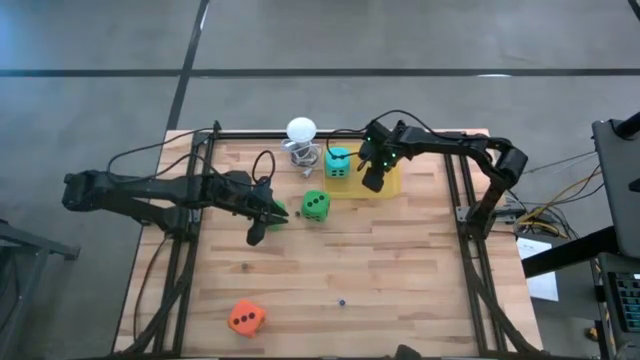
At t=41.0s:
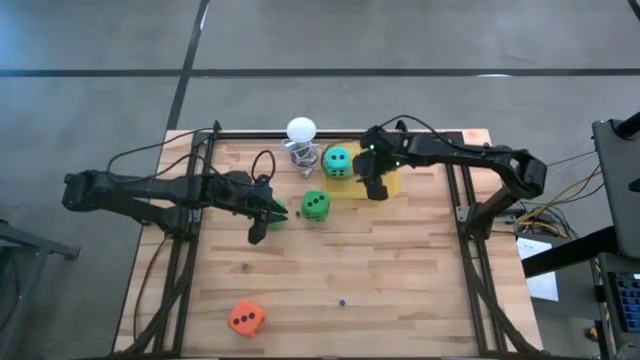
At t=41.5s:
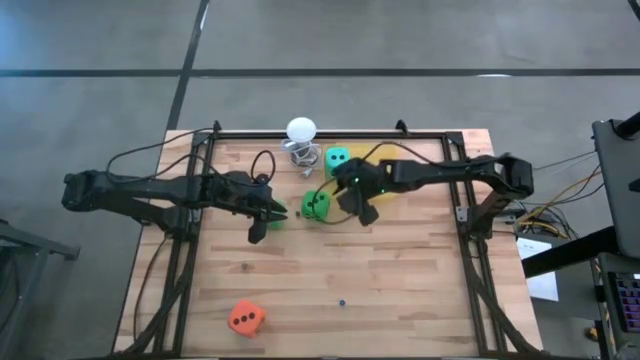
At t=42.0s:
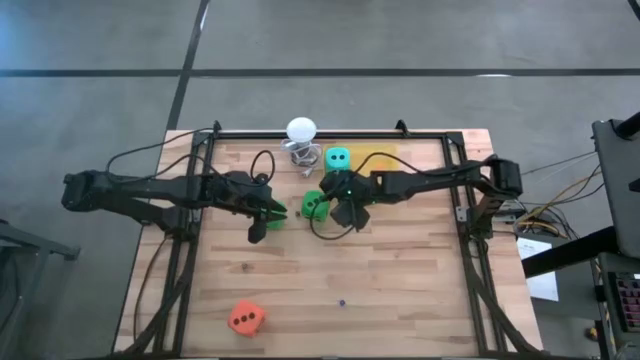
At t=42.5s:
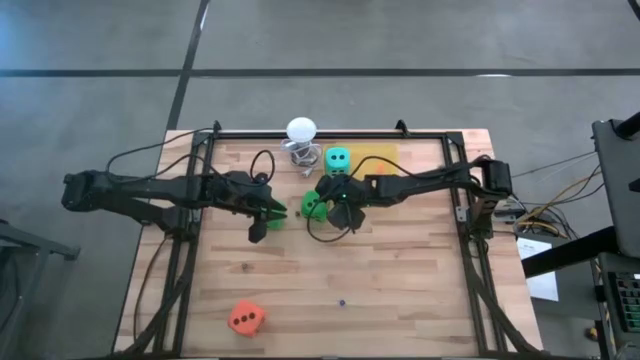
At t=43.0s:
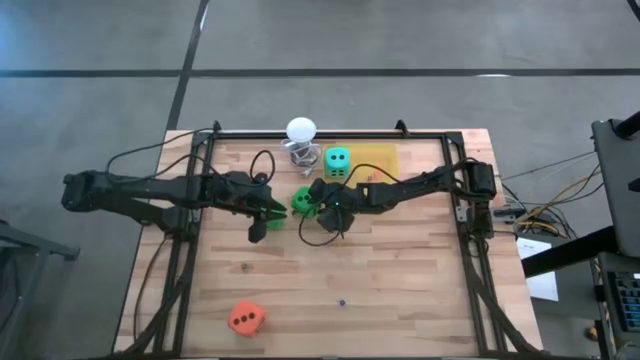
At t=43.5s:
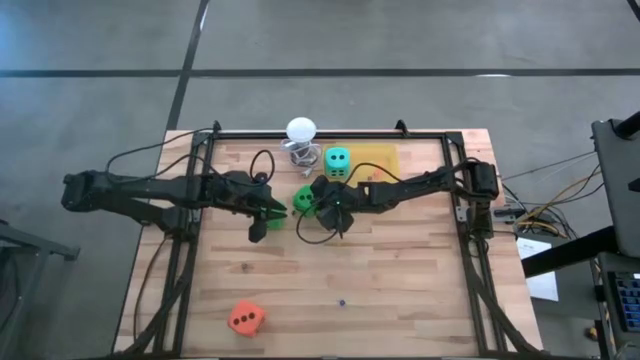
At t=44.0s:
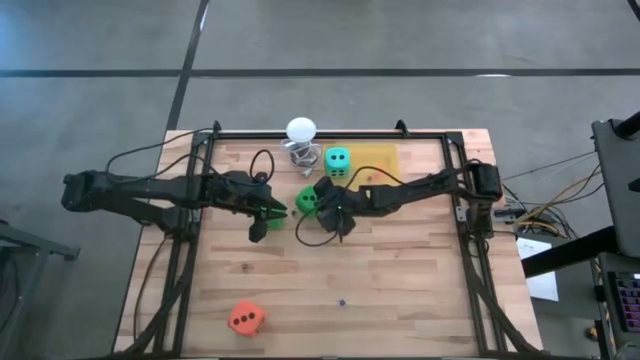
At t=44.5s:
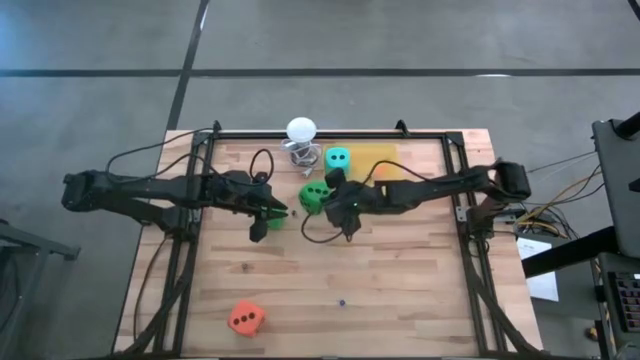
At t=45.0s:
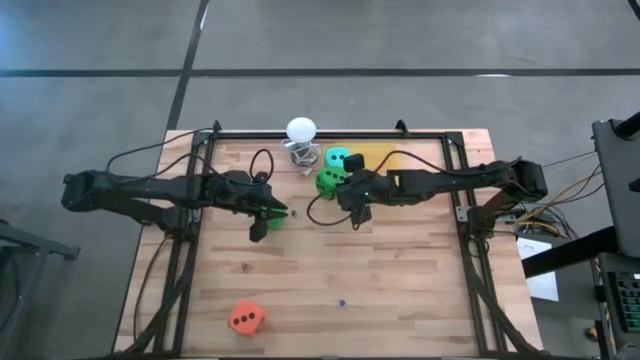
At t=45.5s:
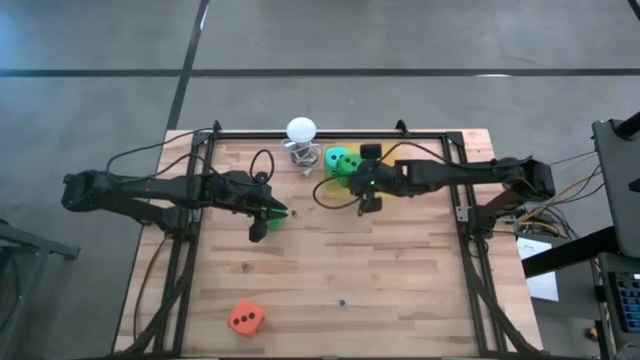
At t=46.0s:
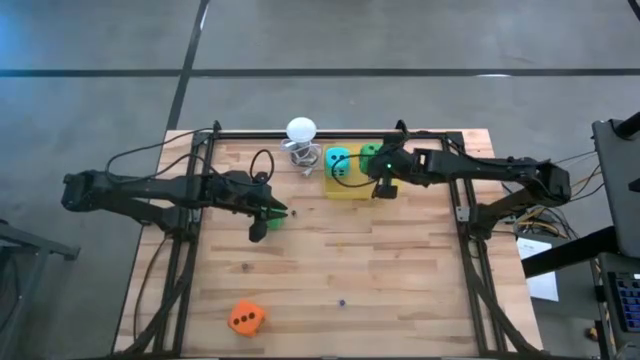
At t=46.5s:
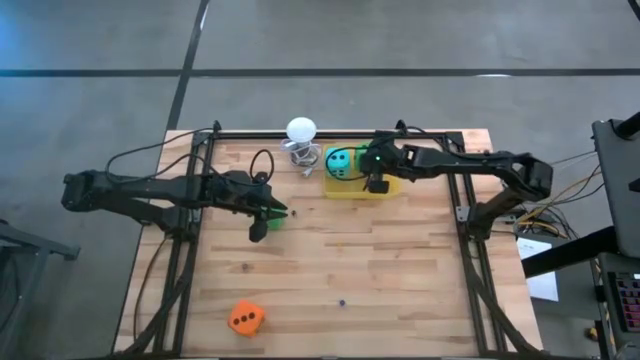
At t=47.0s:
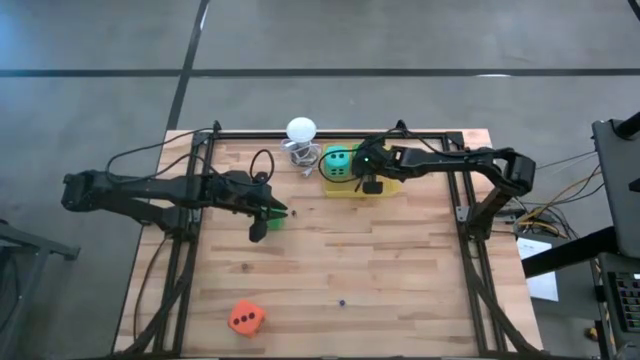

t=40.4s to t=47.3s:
Task: Pick & Place Dice
Put the right large green dice into the yellow bin

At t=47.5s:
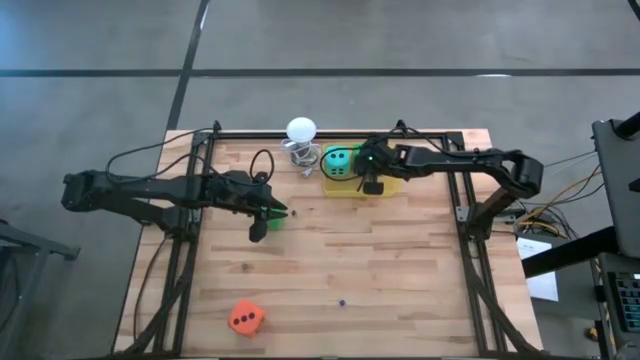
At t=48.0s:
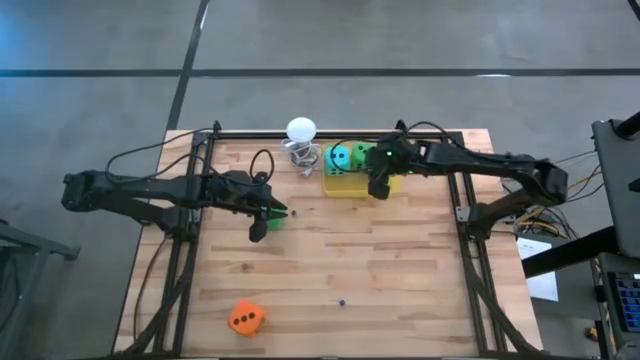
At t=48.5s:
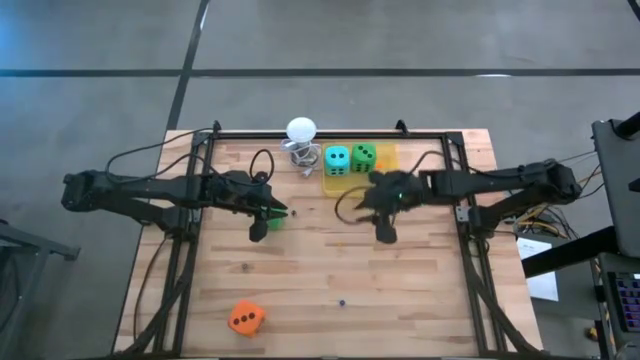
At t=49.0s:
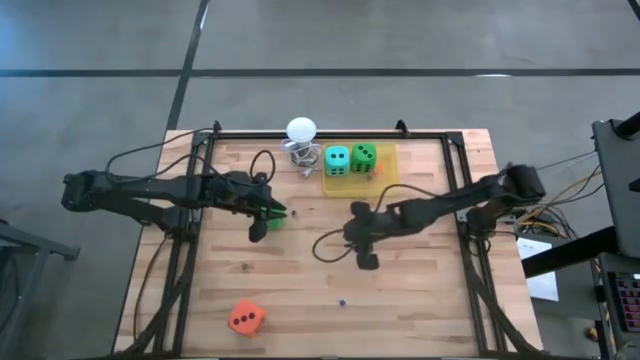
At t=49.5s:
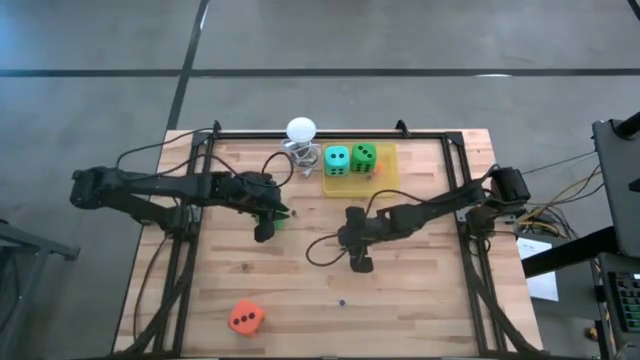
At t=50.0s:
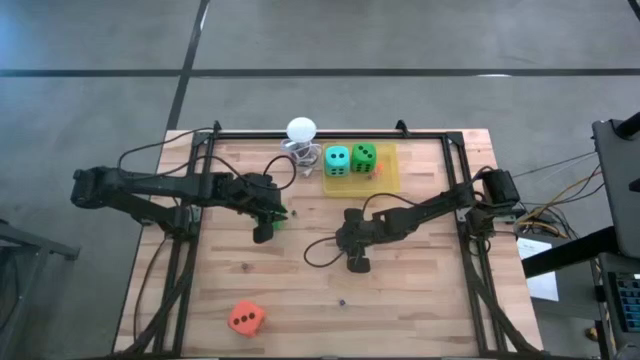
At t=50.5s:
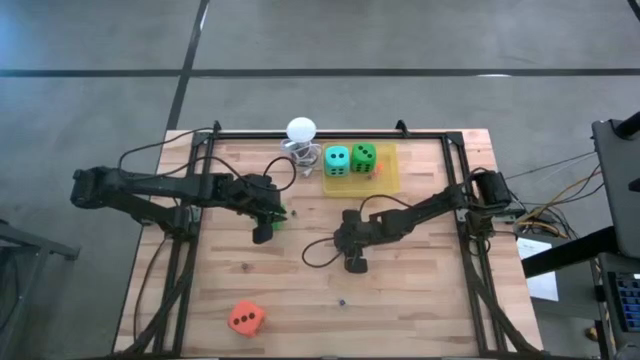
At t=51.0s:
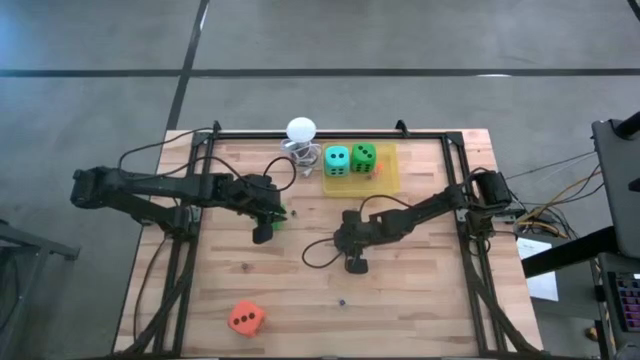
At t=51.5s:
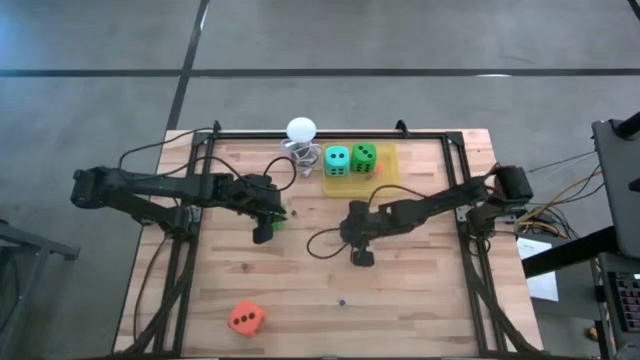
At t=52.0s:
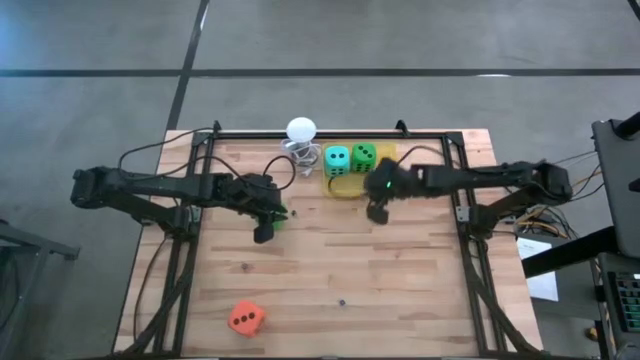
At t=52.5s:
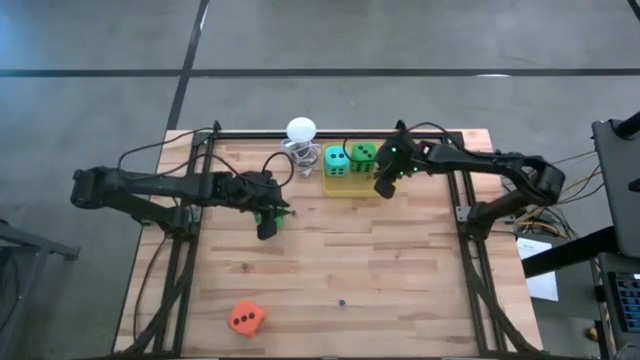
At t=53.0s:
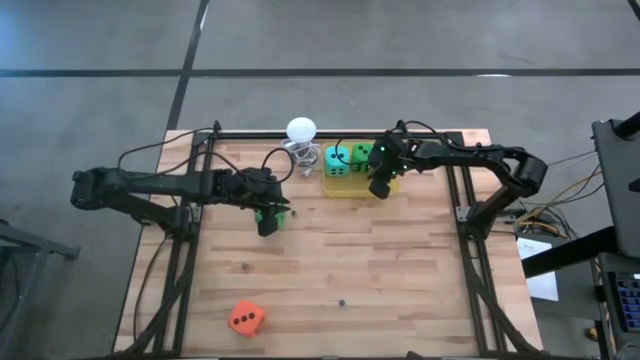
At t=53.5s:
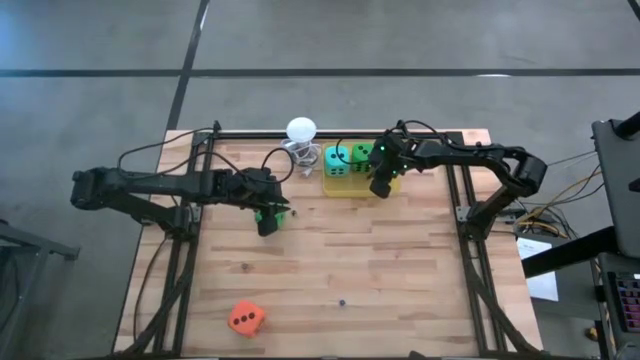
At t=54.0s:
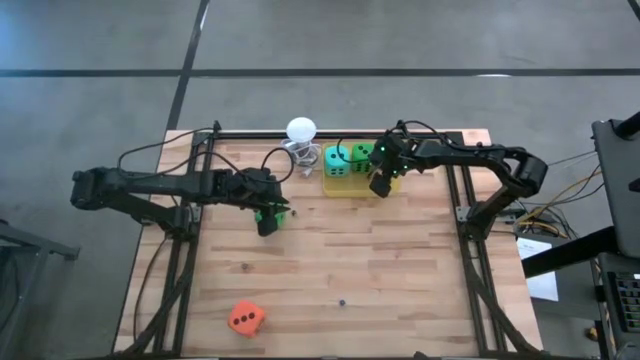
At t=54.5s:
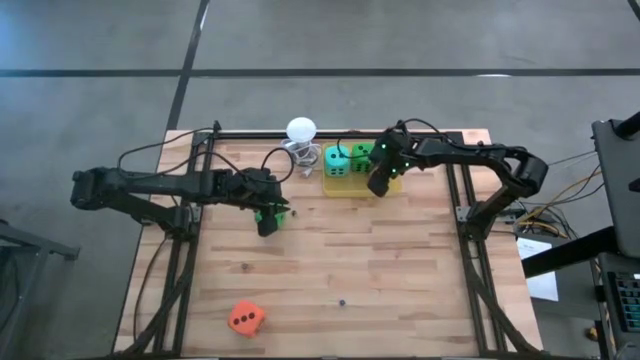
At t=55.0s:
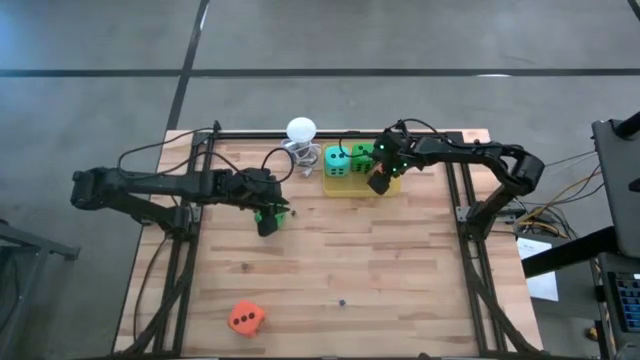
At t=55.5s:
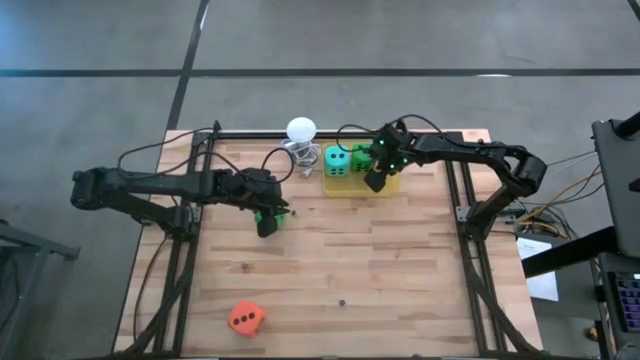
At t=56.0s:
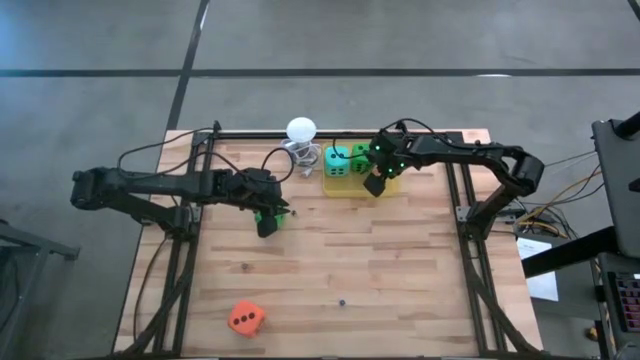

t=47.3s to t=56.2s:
Put the small yellow dice into the yellow bin

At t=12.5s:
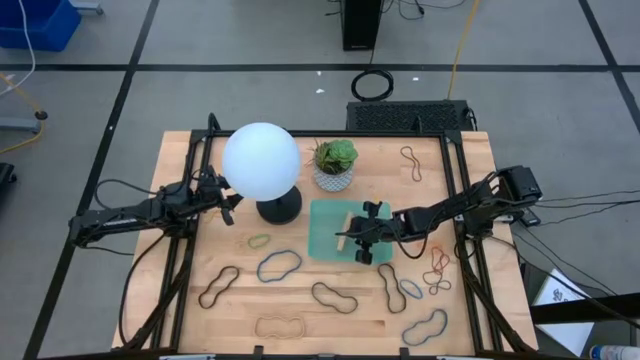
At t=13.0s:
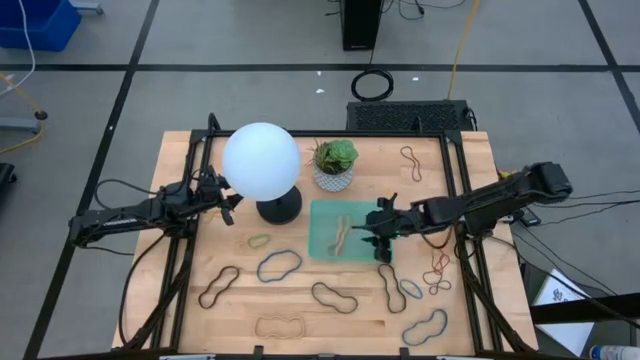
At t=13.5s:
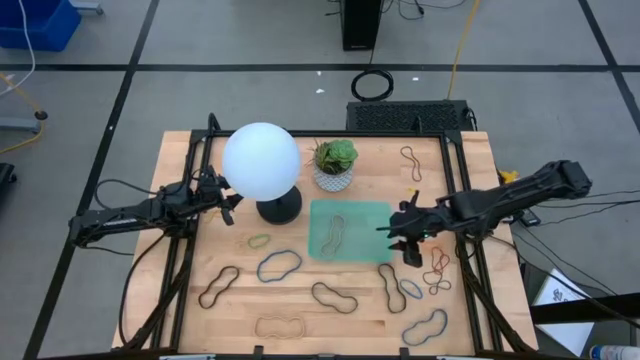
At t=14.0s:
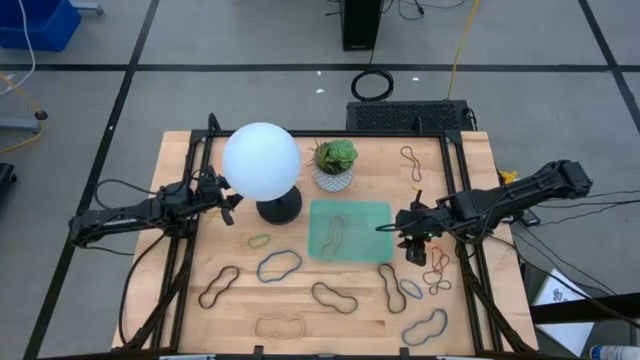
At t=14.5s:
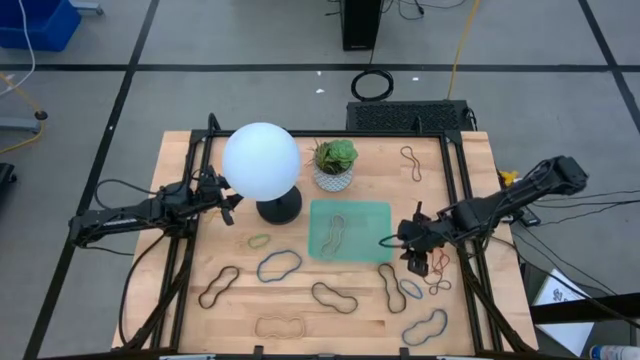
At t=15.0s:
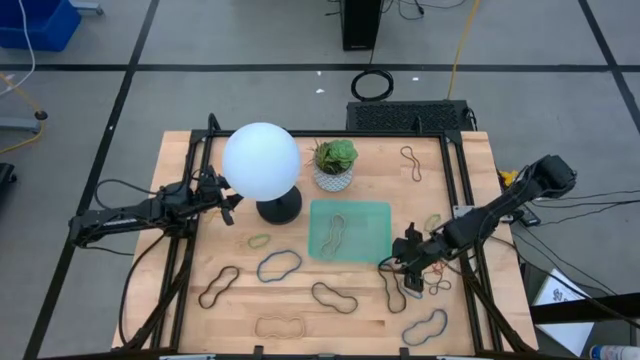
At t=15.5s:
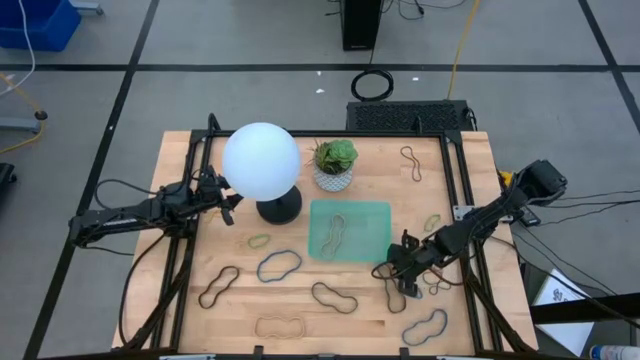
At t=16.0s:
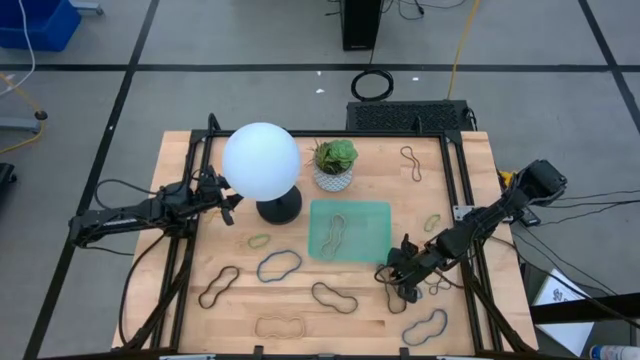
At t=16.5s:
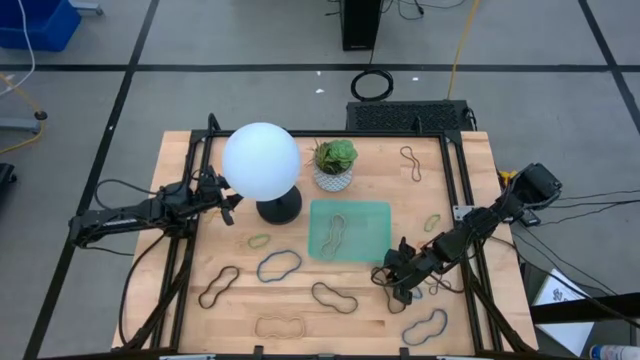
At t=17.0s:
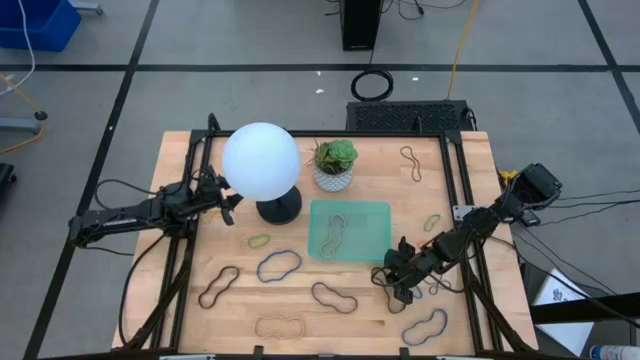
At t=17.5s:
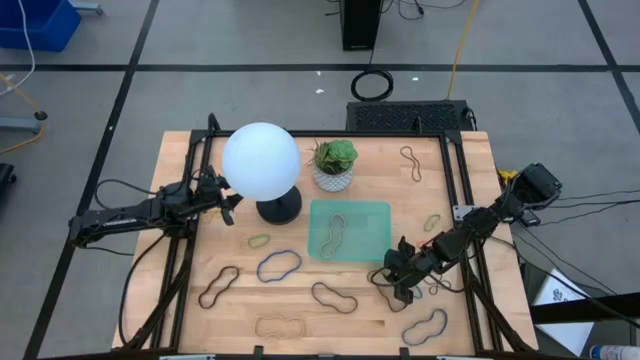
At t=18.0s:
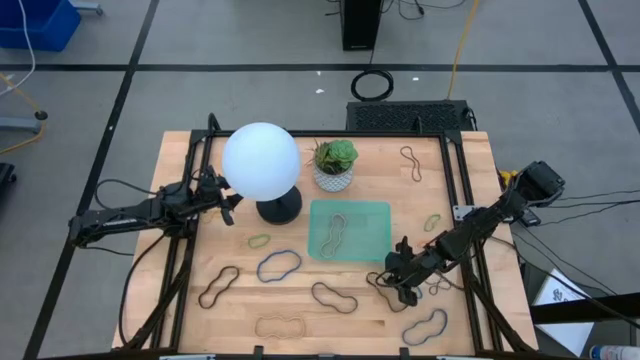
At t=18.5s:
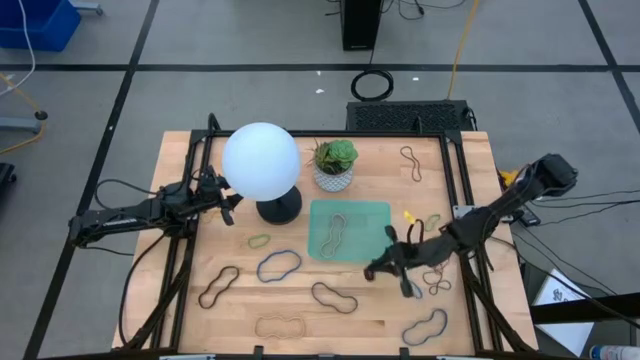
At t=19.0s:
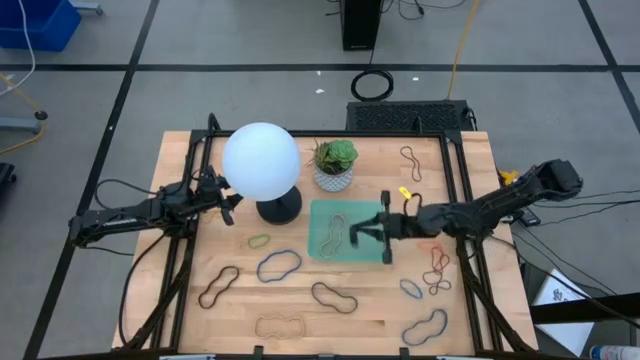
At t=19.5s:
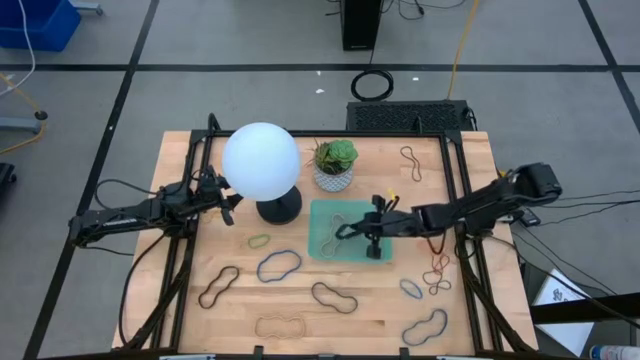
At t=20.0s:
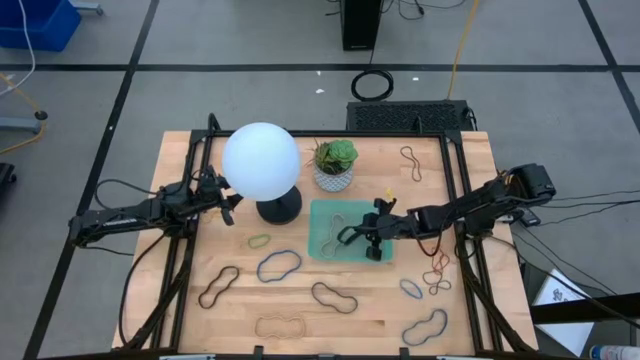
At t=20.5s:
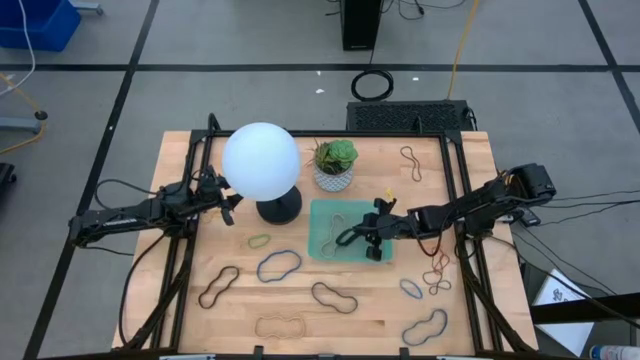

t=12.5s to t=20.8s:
Task: Pick and place rubber bands into bin
Put the right black rubber band into the blue bin
